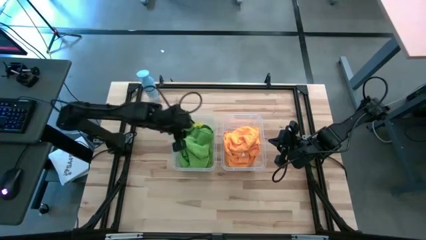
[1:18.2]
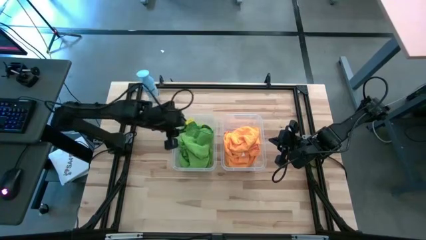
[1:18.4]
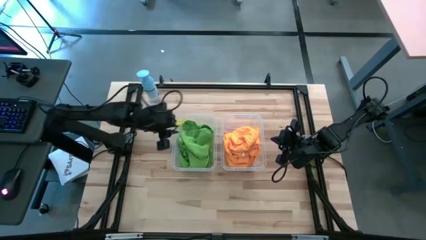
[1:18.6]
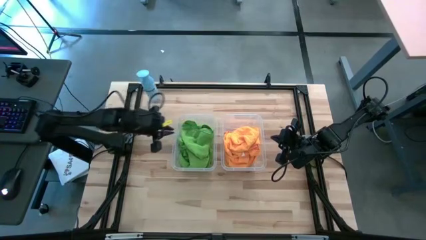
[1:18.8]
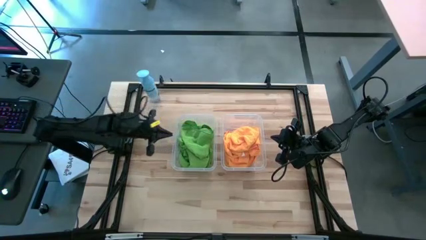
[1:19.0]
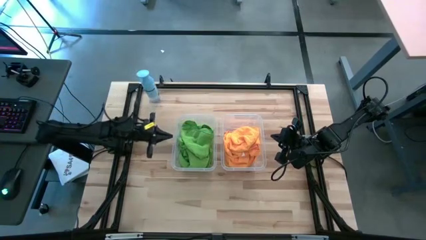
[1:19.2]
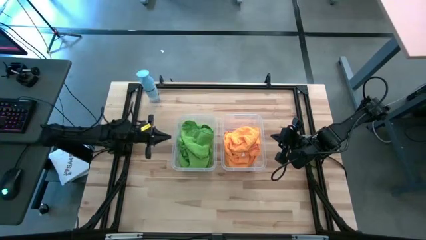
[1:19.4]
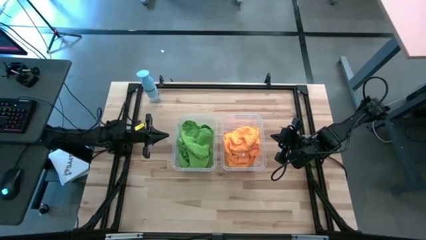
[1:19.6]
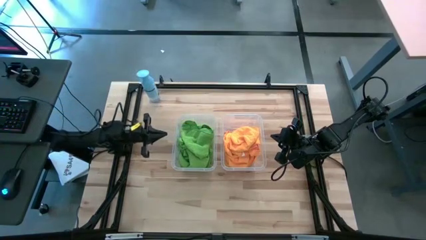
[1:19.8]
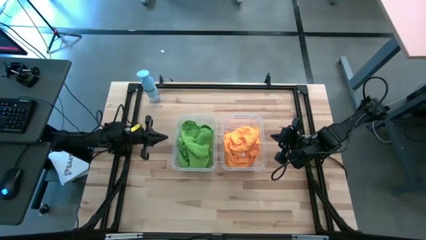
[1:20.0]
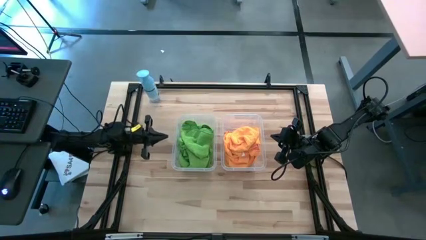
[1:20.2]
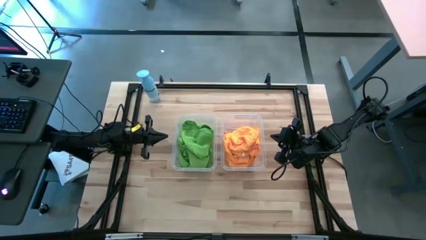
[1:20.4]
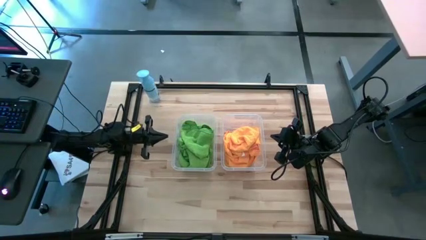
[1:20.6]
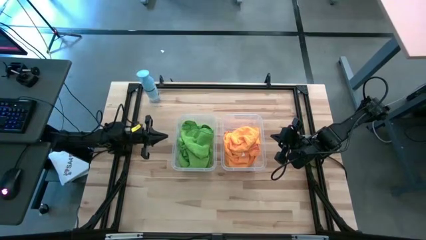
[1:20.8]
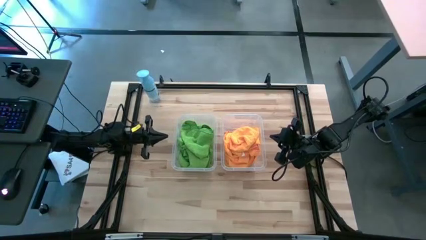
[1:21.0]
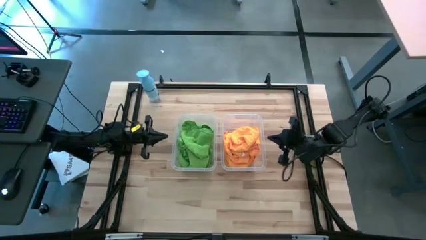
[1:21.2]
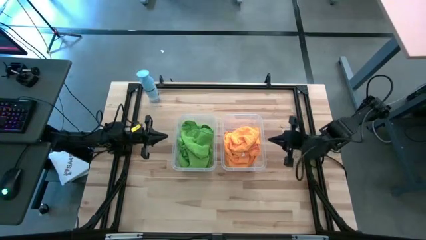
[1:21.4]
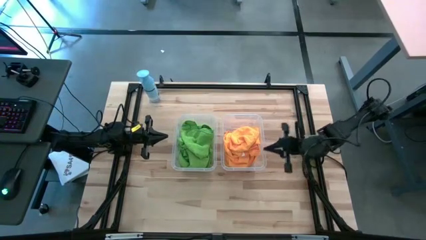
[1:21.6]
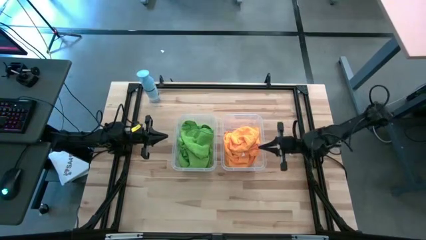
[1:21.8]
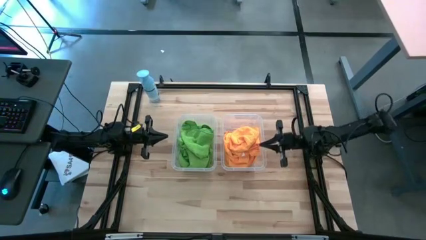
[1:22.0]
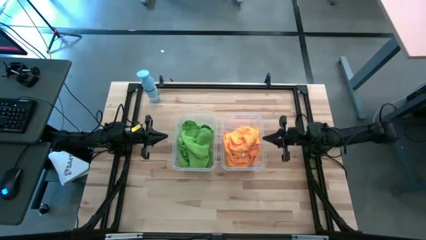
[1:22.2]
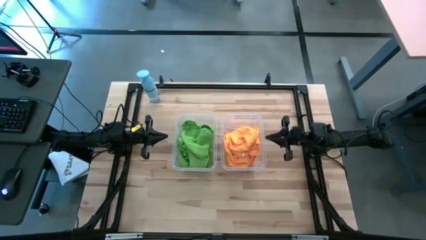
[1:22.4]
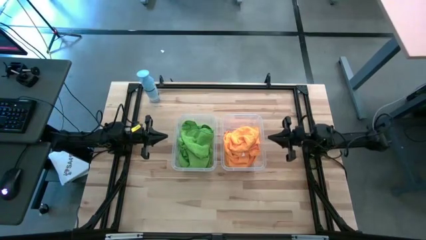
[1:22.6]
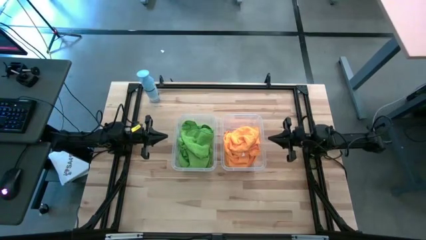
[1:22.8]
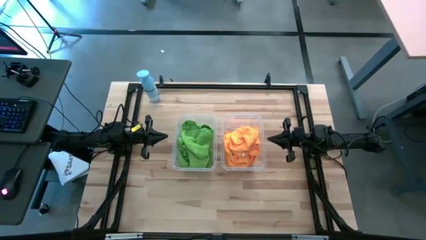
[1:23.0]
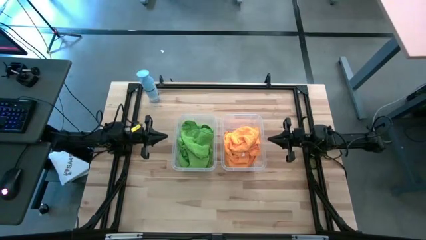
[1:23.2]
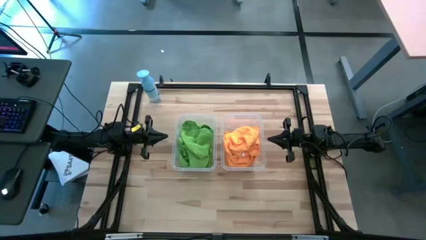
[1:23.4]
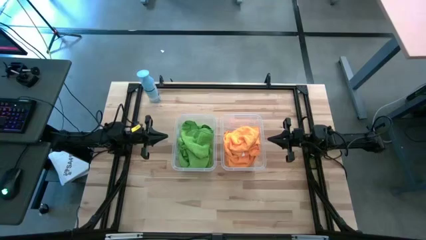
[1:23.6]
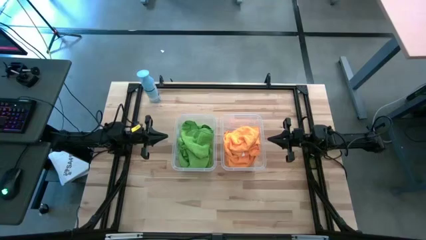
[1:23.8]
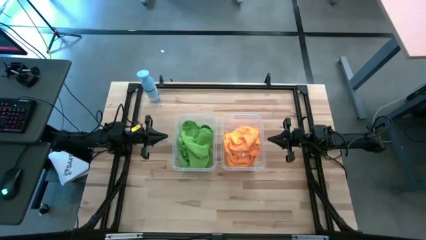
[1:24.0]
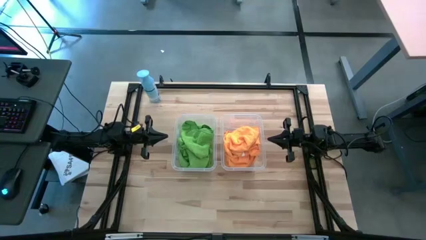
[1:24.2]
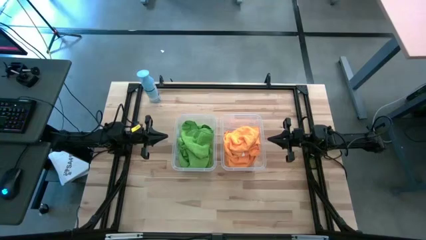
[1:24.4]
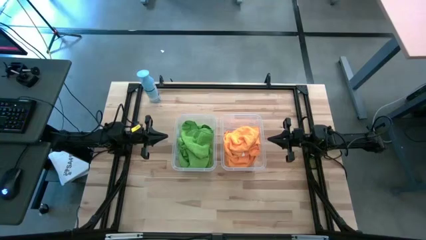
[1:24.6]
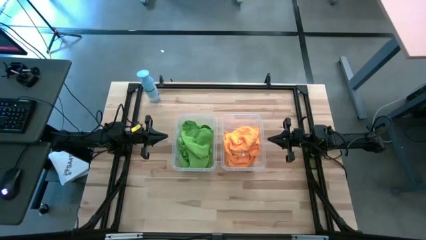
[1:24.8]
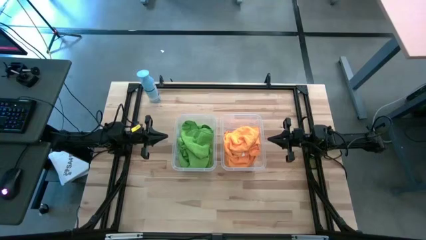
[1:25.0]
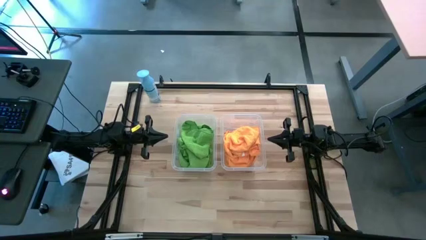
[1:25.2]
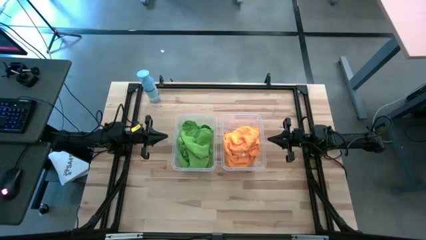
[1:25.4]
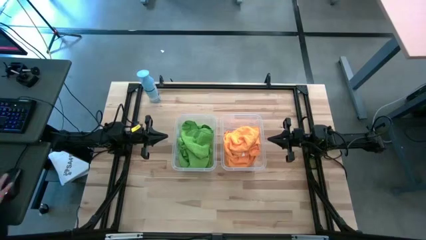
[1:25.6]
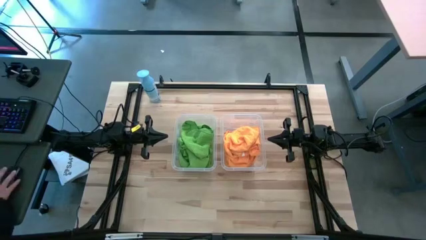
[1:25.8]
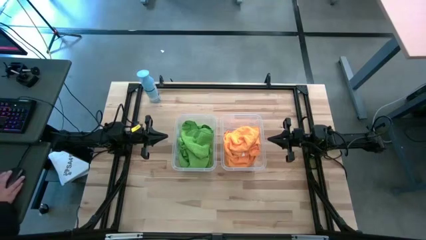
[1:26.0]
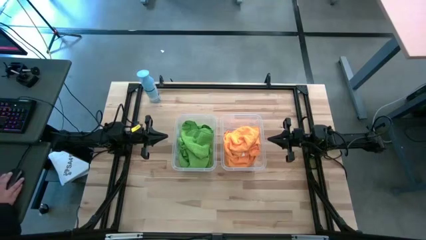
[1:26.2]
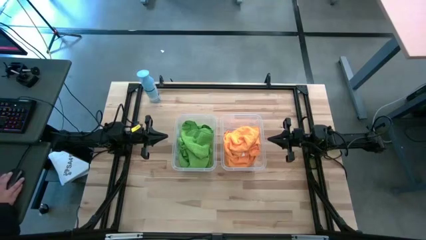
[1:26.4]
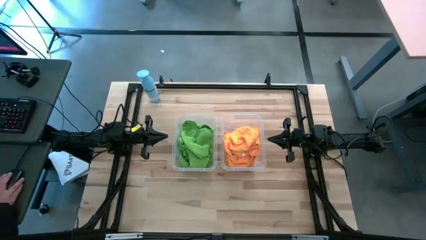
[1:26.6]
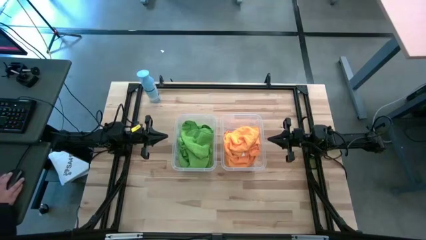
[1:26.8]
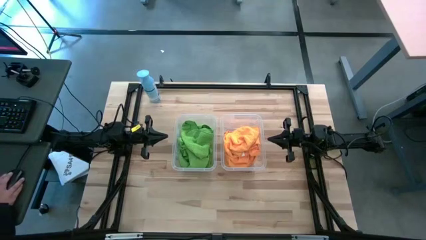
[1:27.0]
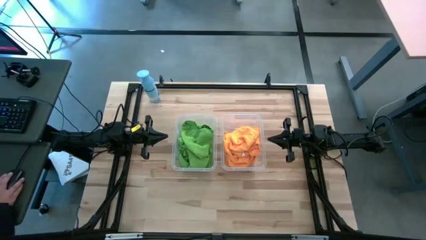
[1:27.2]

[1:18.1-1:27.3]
Task: Sort microfiber towel by color & place in baskets
Return to Home Position

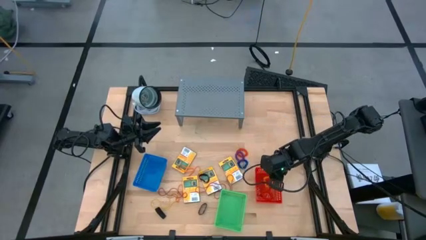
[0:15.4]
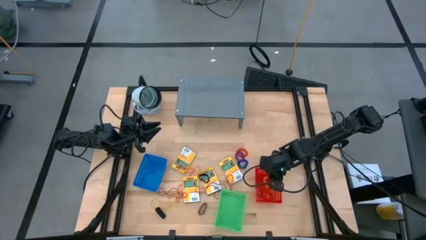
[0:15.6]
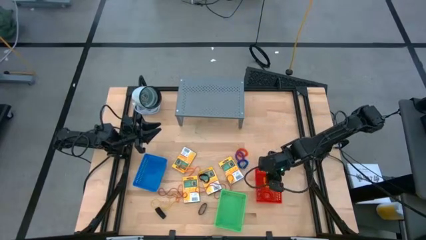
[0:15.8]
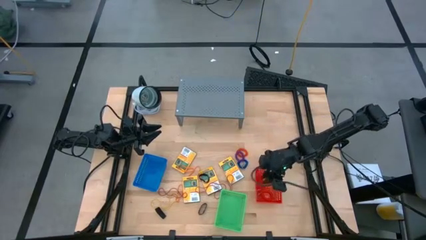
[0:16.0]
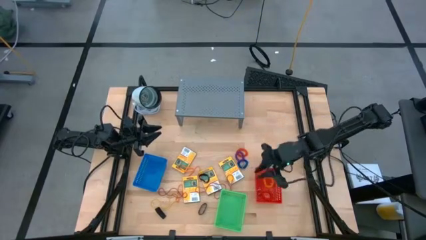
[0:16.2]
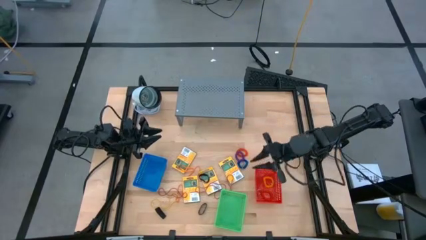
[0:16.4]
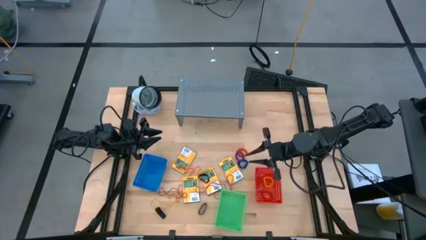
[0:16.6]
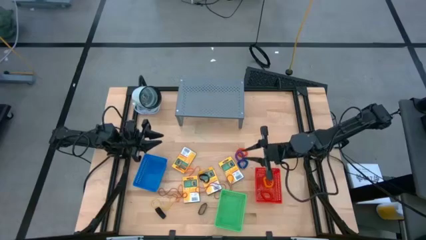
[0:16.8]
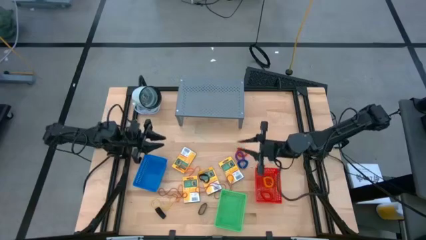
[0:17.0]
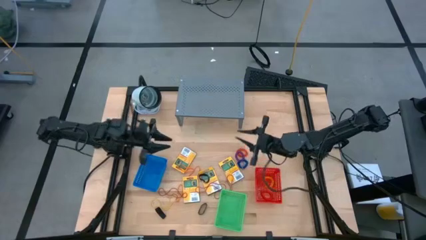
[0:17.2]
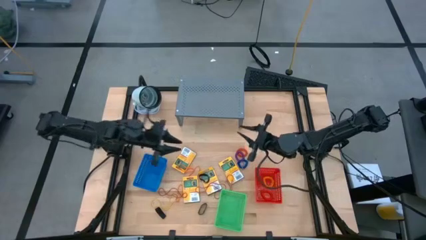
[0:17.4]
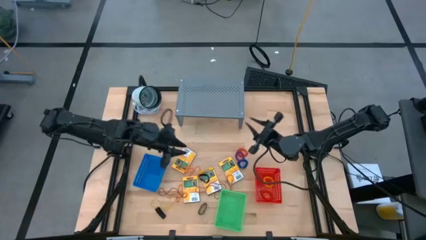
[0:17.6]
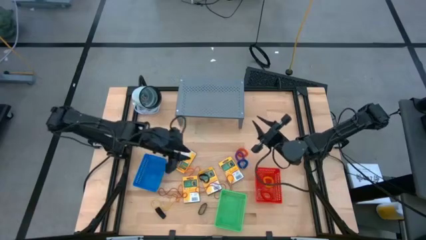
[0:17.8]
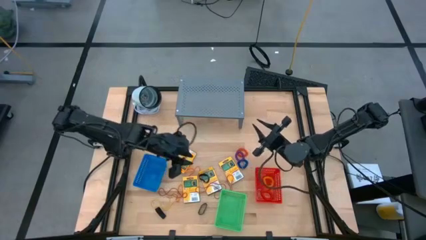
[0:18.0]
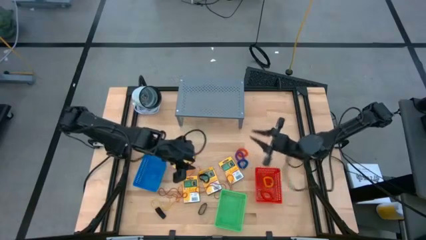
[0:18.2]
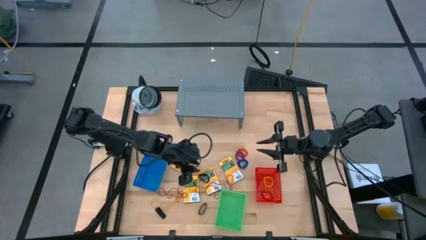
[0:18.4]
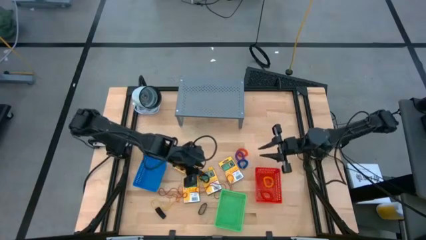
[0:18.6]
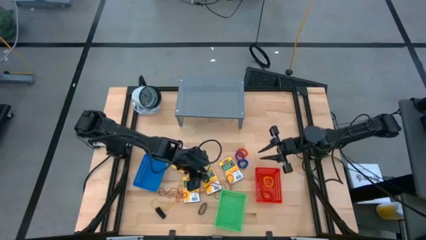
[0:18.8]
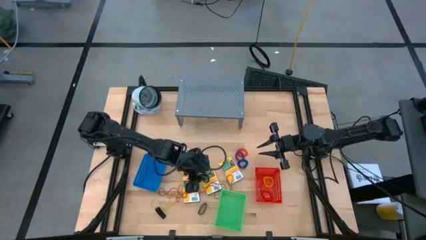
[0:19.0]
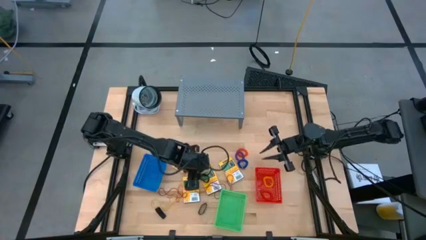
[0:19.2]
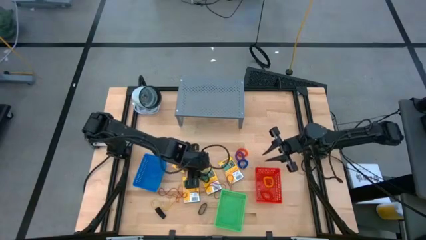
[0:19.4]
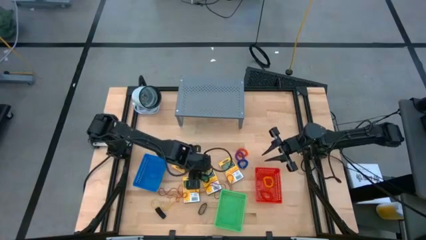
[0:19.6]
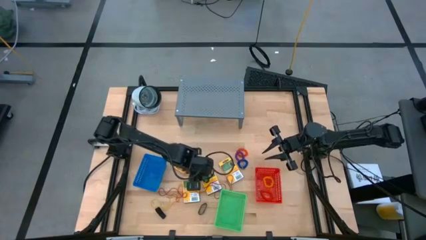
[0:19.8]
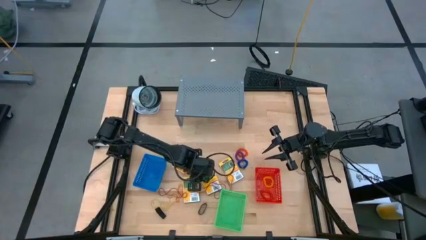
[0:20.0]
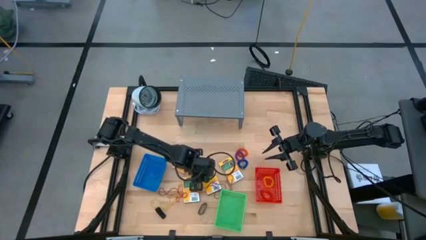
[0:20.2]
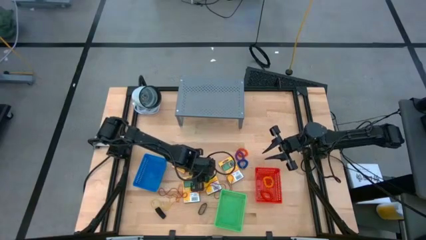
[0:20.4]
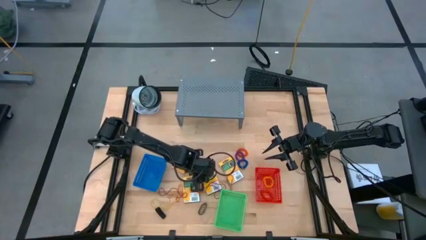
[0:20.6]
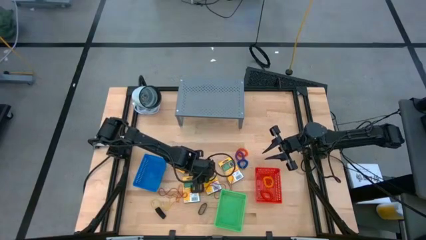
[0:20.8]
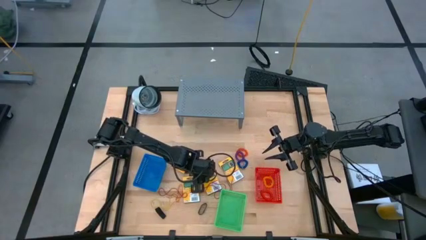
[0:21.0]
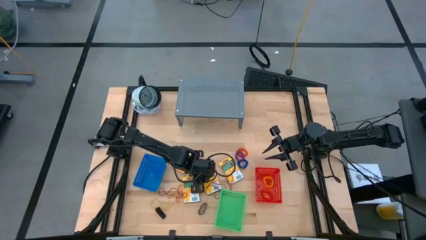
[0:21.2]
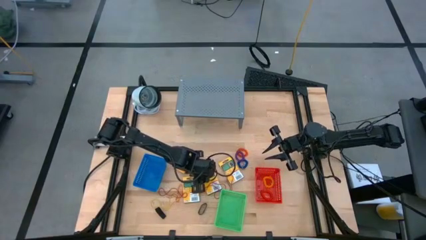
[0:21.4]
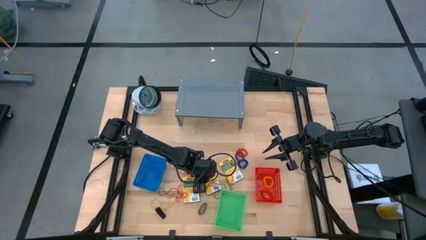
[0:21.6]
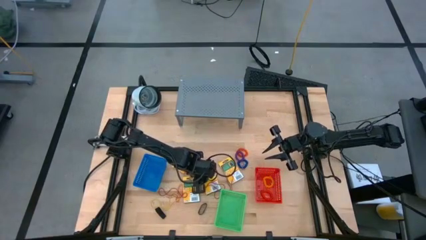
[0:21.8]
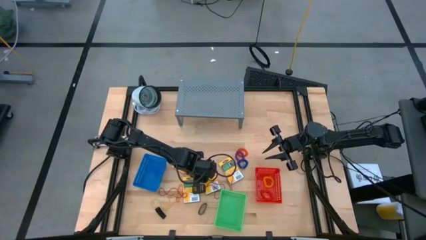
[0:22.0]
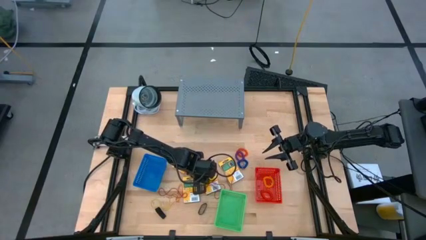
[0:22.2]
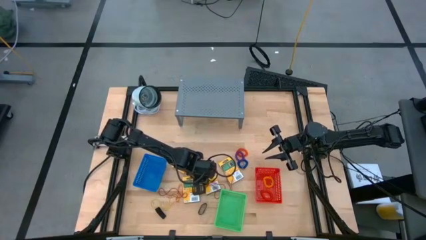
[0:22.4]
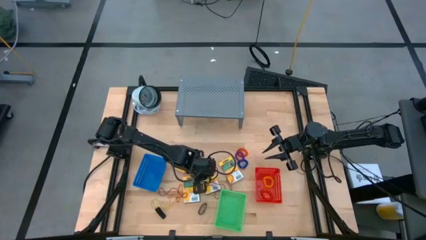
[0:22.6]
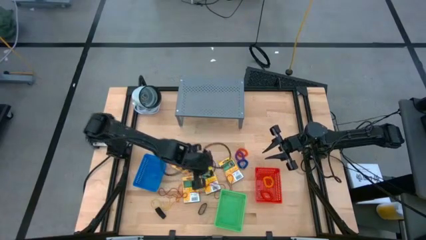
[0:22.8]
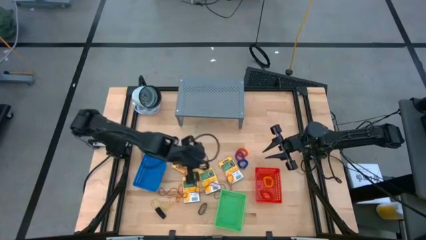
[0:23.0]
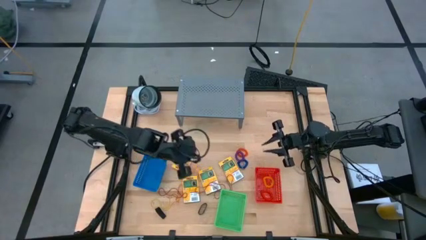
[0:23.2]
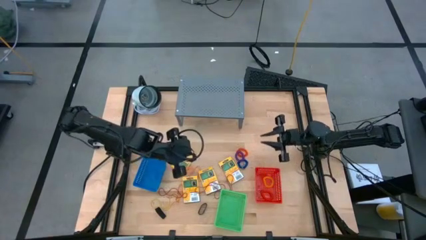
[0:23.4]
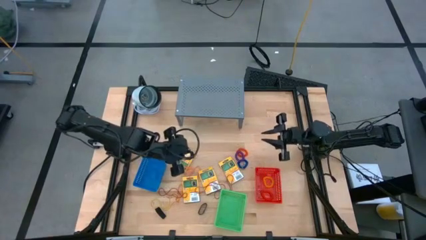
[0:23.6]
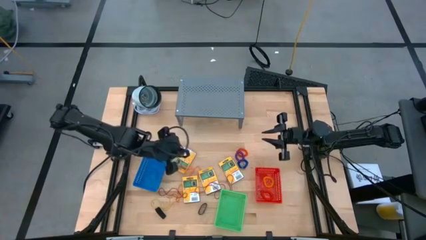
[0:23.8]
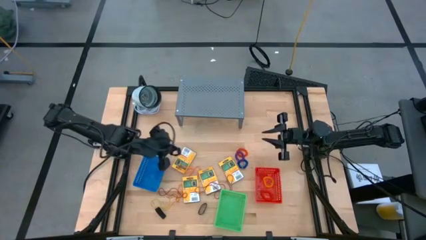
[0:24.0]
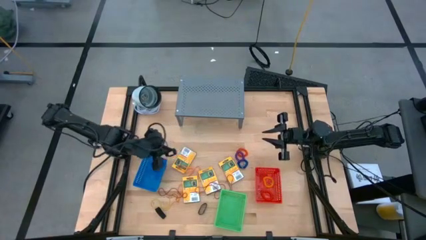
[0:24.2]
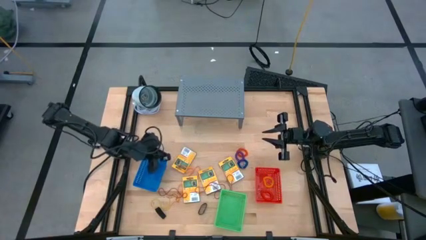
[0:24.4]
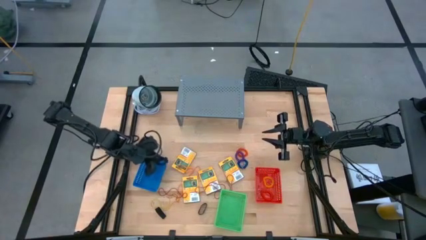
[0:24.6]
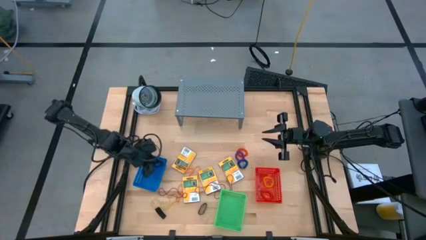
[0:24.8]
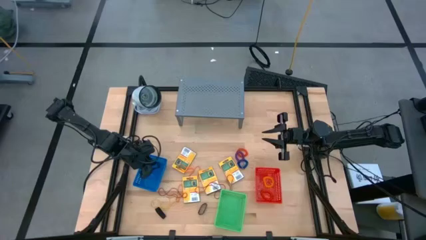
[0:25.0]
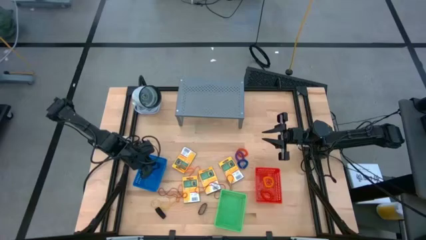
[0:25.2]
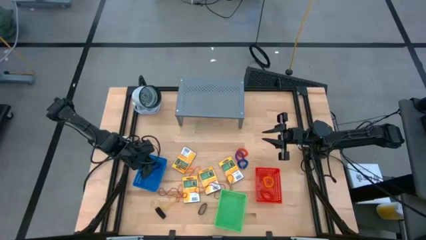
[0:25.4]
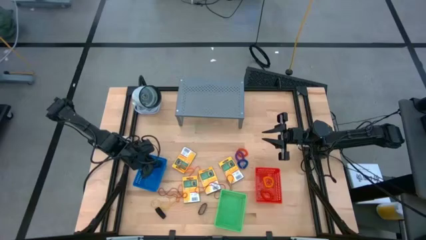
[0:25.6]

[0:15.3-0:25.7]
Task: Pick & Place Office Desk Supplies
Put the black rubber band into the blue bin
